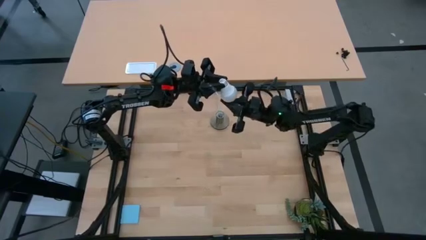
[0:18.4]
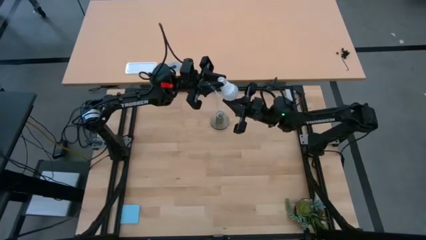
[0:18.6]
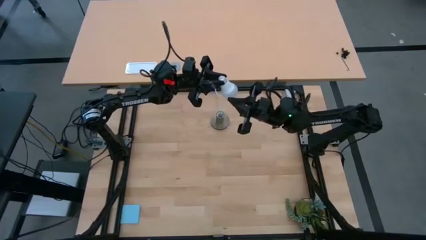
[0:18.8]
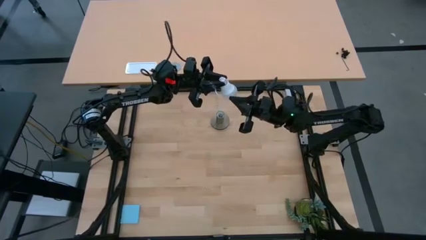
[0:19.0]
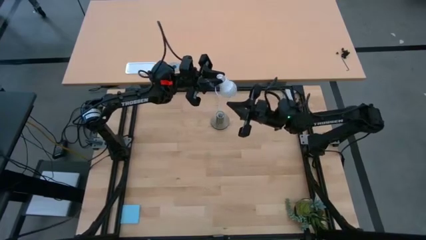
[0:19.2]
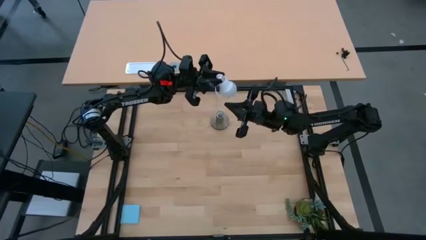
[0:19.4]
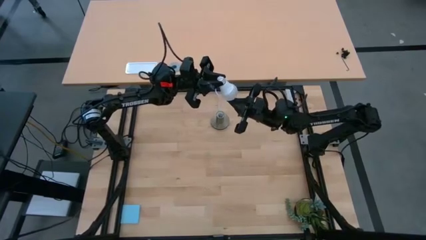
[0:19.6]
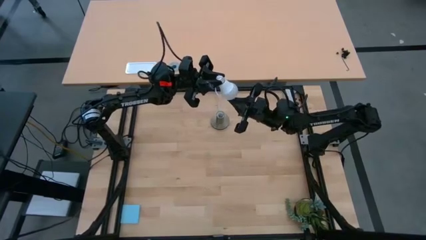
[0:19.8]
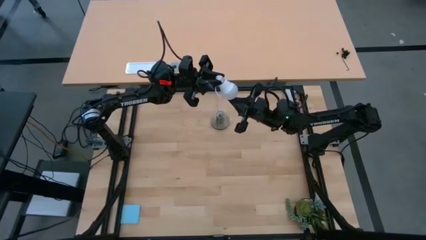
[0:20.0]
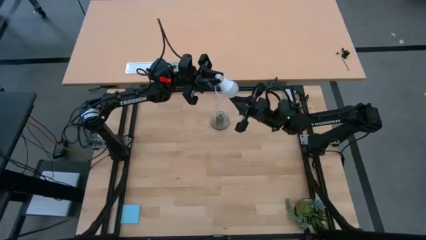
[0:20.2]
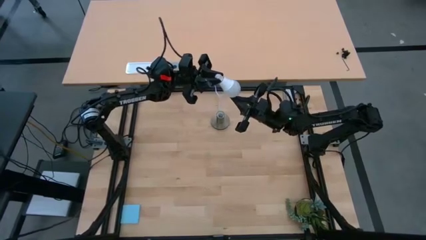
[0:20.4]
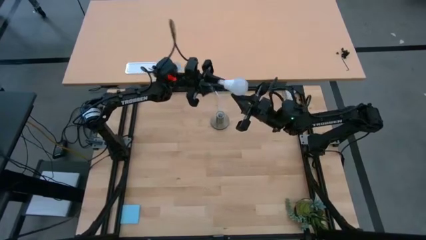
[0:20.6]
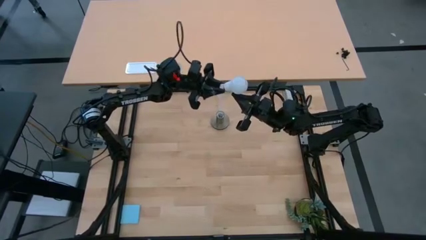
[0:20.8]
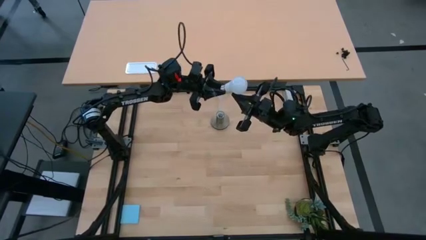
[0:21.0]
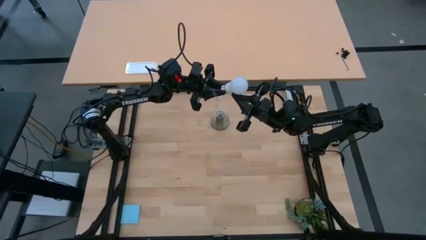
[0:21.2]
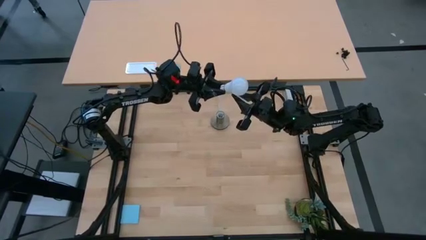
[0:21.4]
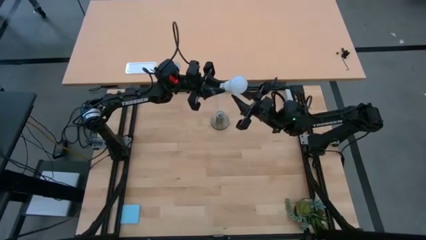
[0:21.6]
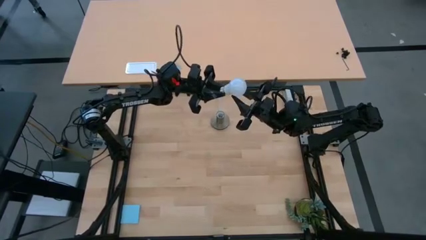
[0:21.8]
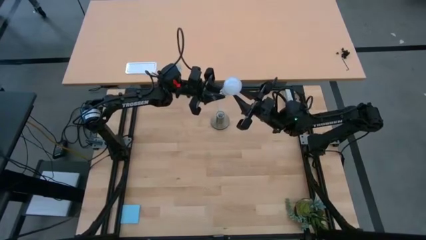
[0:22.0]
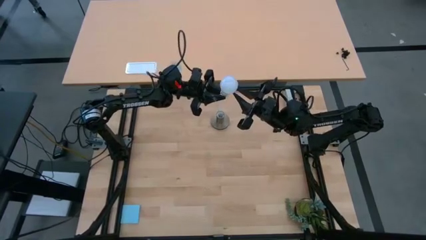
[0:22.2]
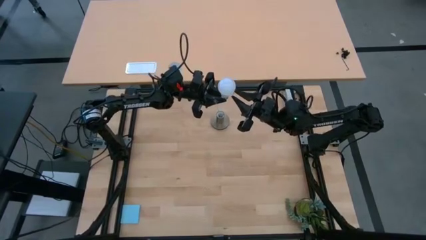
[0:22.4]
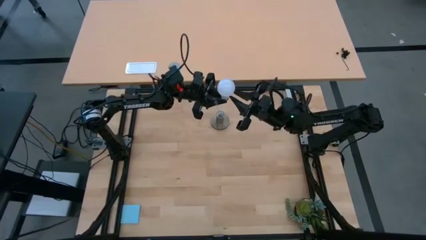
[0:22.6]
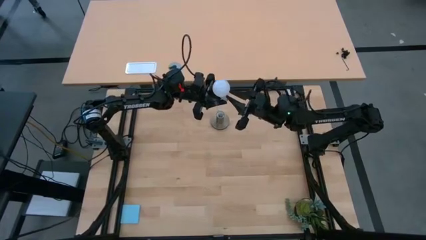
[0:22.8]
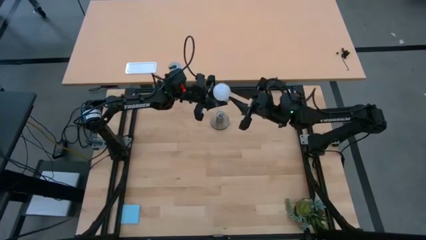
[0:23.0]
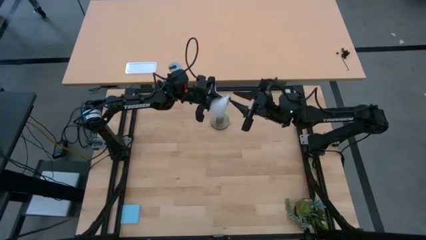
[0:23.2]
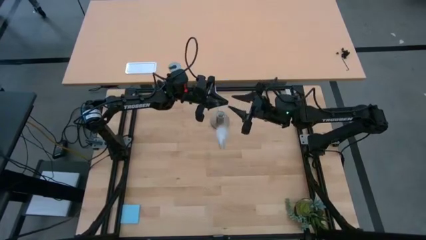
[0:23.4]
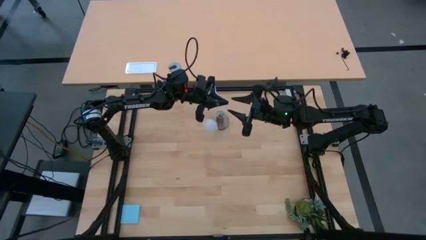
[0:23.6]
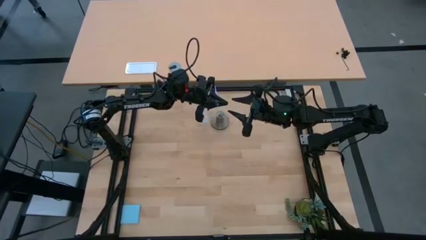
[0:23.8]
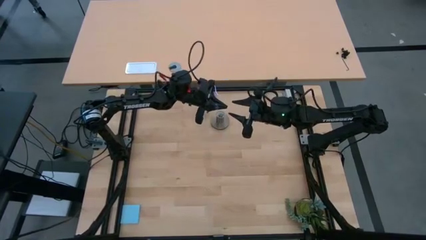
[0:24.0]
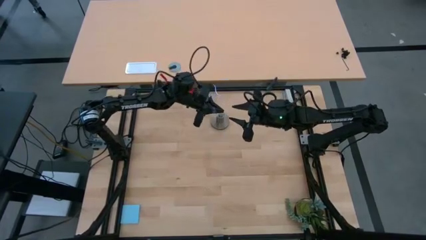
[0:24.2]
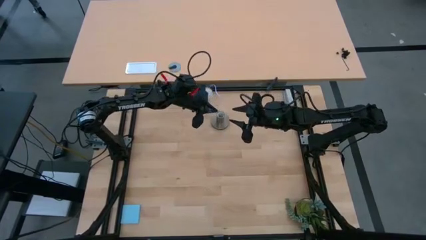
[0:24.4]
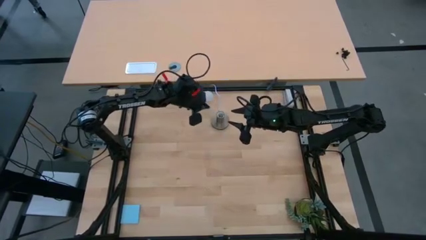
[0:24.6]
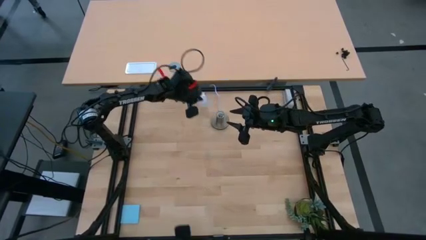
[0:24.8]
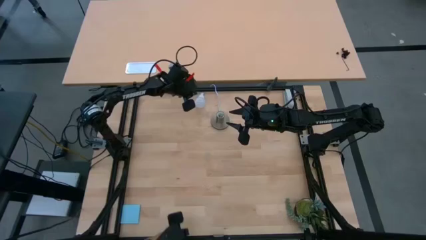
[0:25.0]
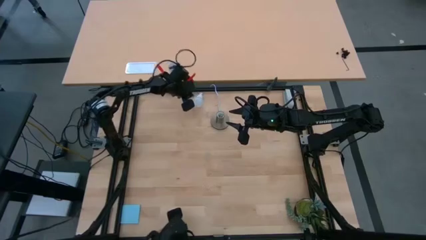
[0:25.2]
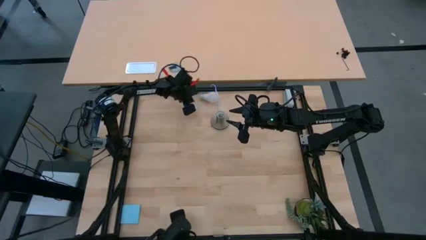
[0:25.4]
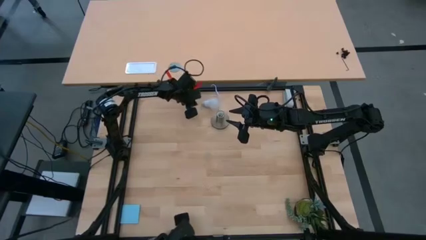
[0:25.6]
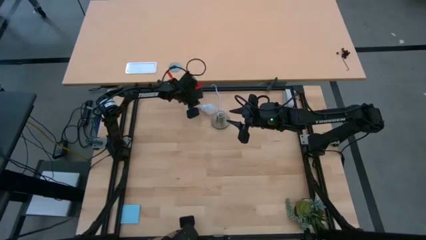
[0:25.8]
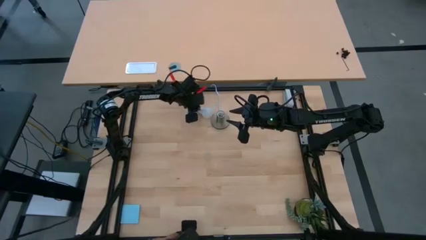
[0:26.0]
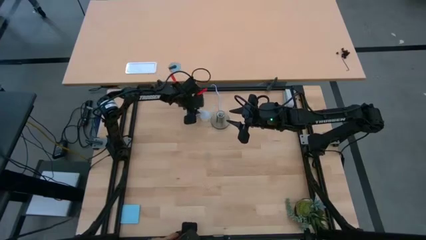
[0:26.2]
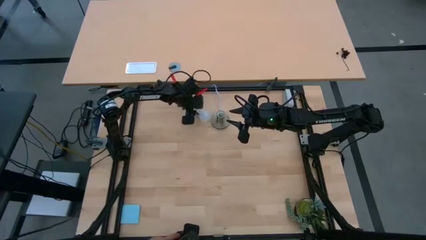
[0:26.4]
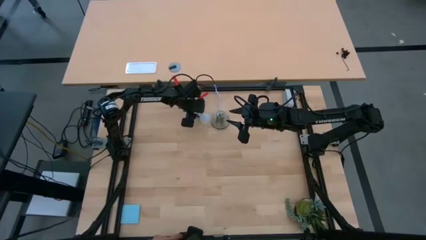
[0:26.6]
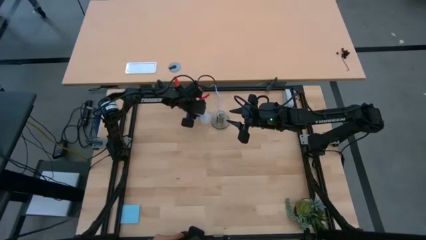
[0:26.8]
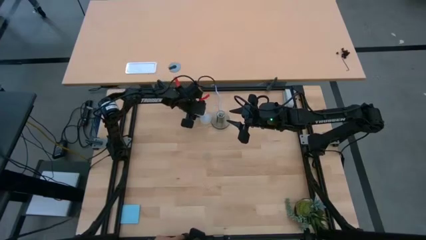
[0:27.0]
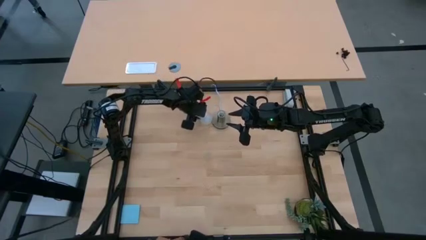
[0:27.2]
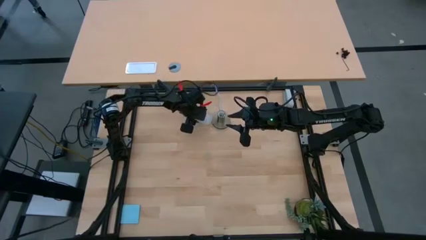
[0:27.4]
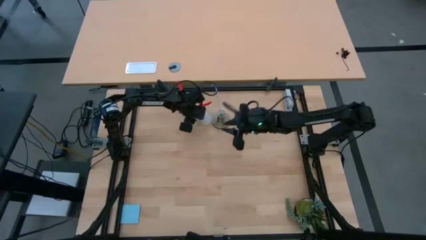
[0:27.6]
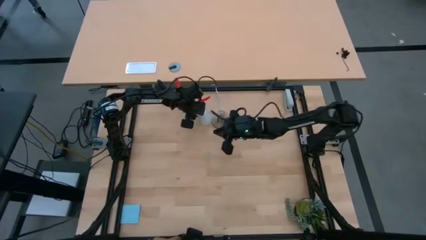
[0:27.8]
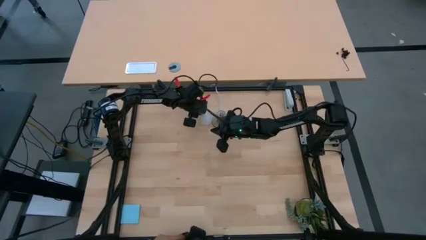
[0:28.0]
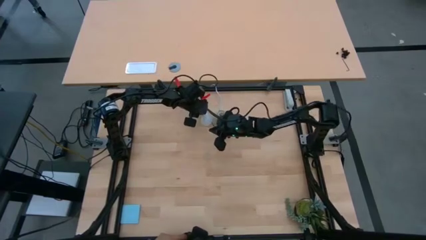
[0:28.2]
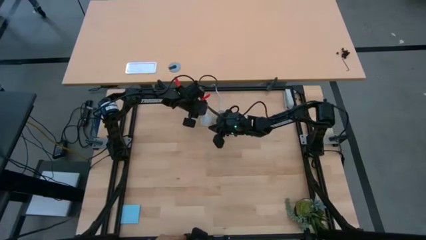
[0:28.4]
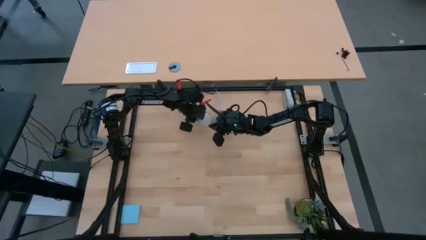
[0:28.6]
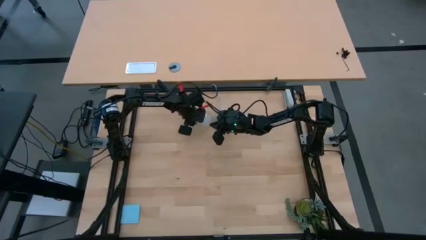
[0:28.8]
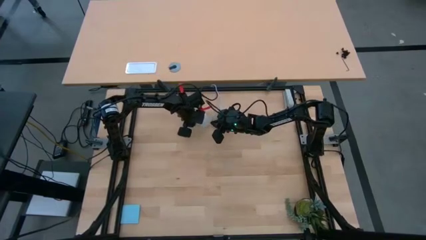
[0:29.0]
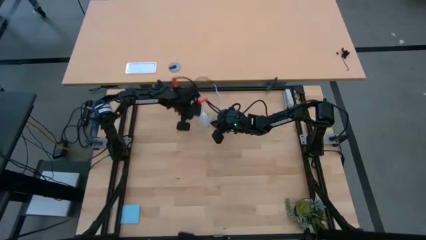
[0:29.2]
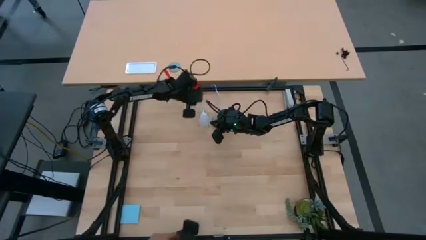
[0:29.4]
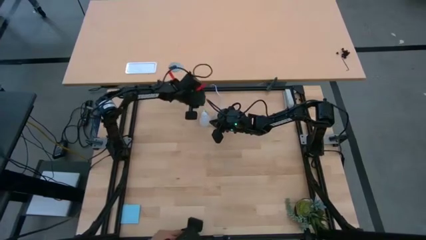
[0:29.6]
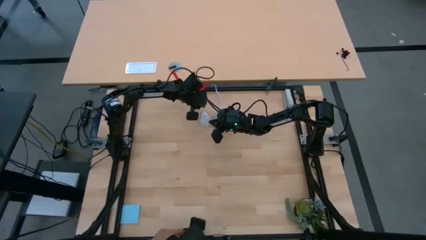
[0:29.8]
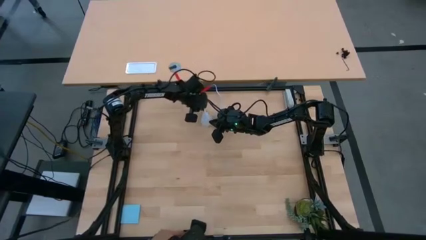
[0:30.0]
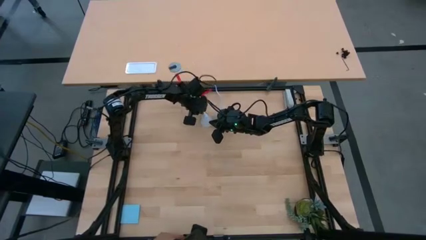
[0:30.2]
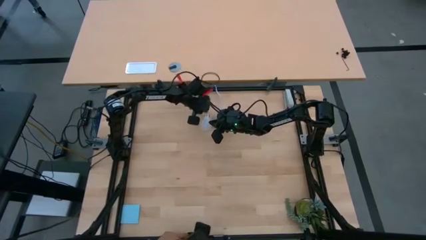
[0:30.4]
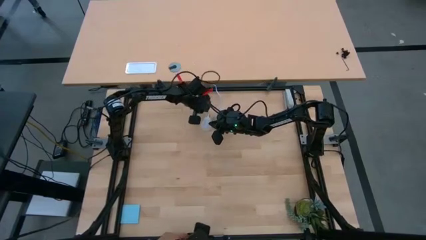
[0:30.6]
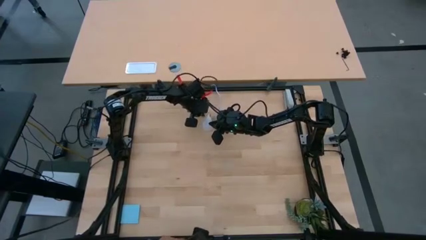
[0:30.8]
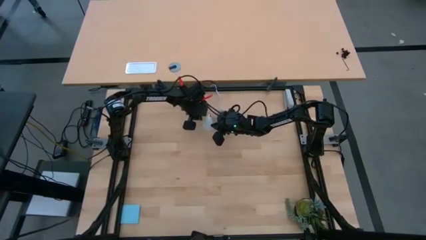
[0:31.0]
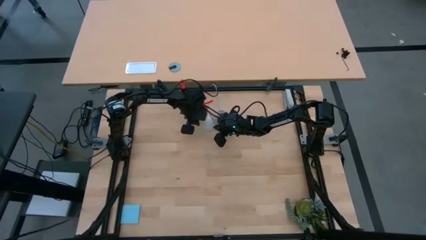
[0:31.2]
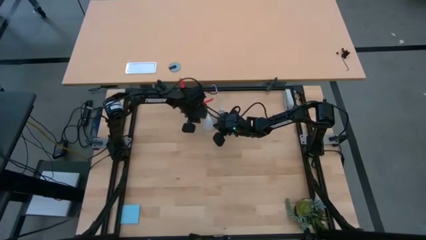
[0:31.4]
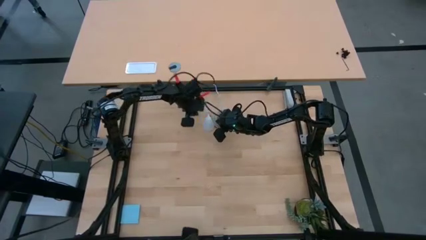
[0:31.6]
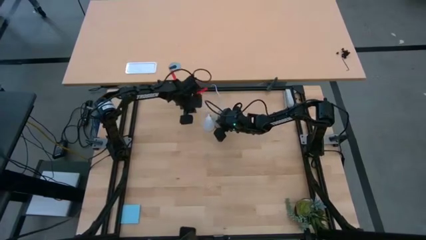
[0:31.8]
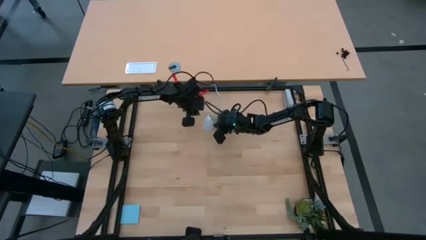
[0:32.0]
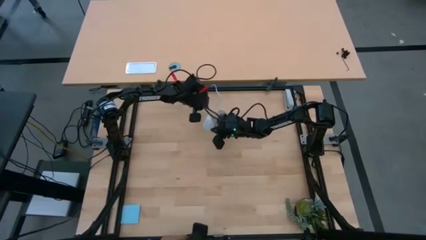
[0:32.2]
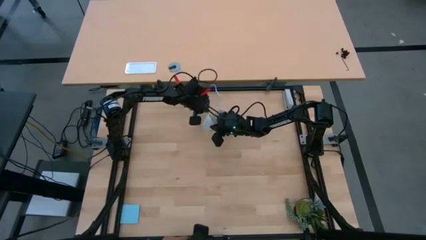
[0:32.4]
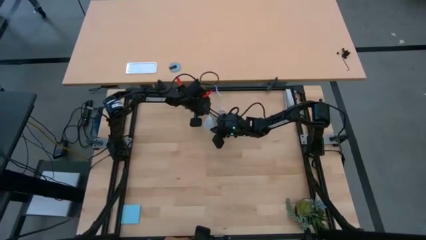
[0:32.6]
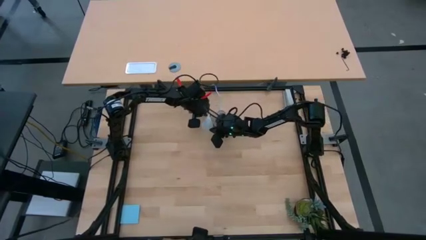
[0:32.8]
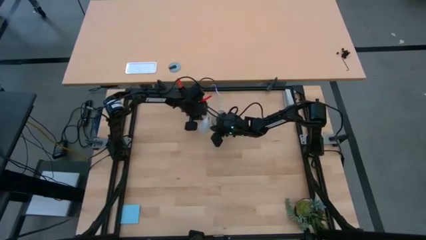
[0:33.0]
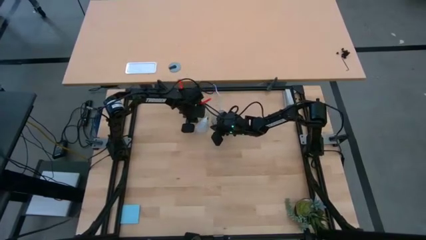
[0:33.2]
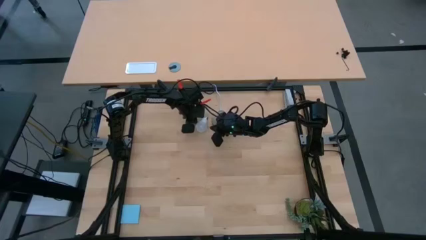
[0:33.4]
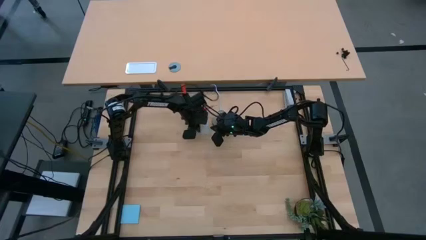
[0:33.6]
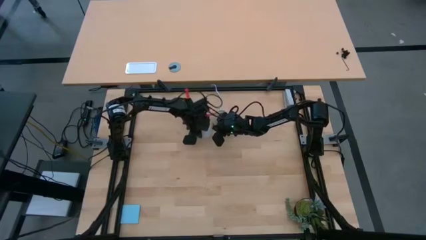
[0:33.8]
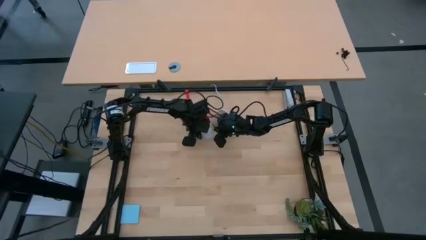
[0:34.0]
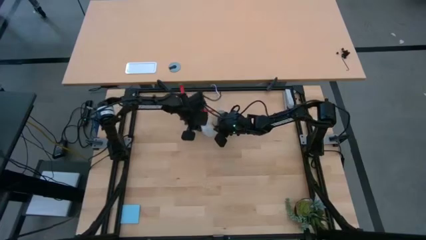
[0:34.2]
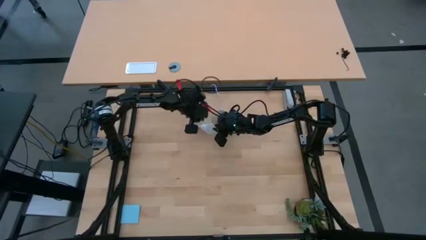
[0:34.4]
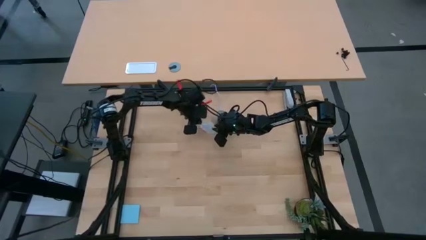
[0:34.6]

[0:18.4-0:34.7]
Task: Screw lightbulb
Insert the light bulb into the table lamp holder
